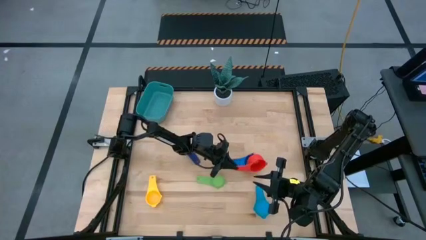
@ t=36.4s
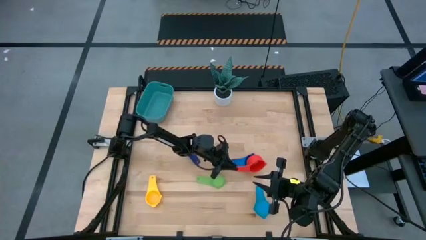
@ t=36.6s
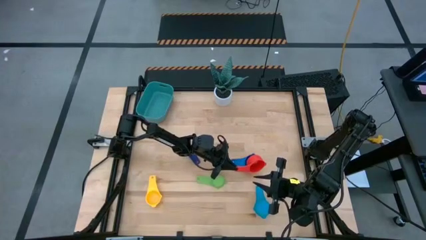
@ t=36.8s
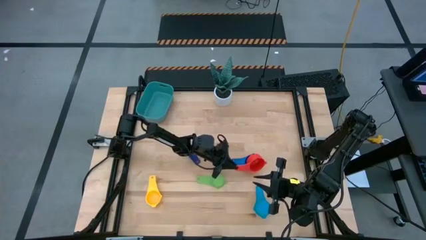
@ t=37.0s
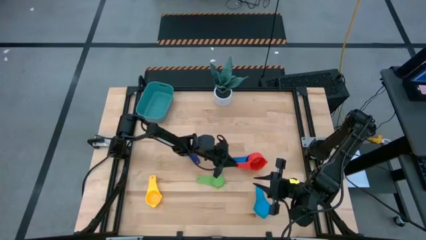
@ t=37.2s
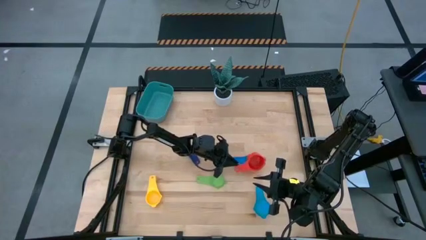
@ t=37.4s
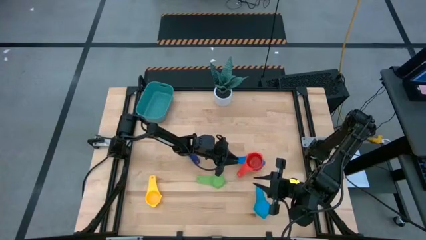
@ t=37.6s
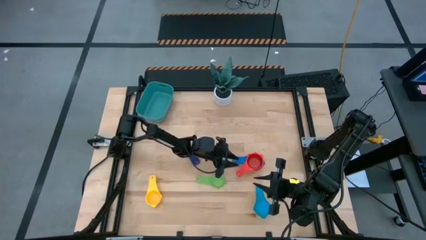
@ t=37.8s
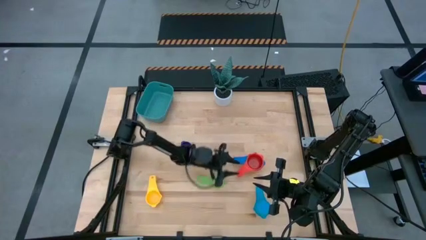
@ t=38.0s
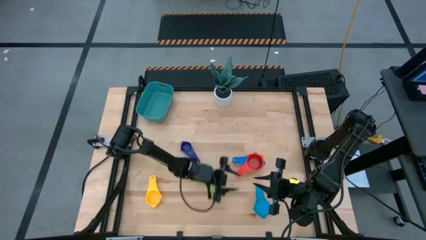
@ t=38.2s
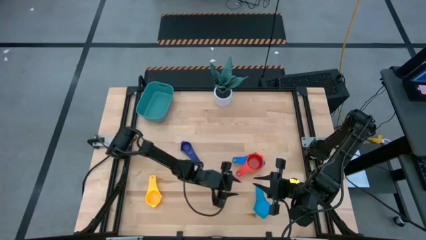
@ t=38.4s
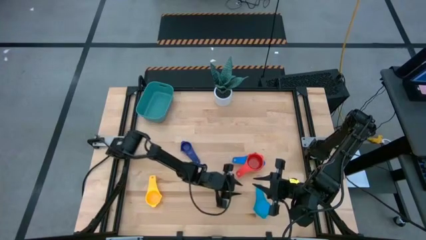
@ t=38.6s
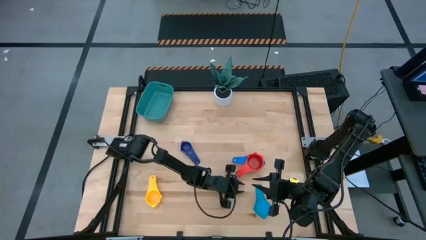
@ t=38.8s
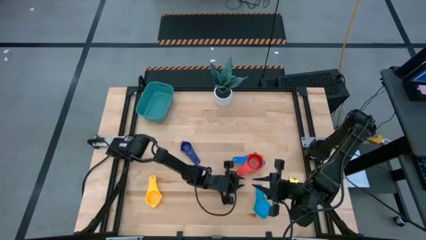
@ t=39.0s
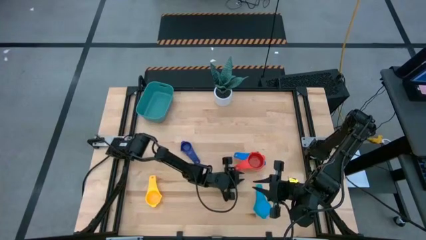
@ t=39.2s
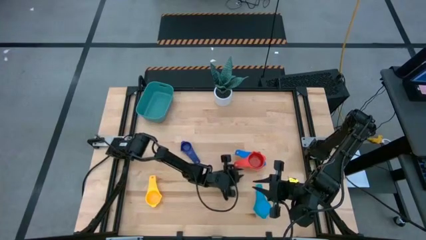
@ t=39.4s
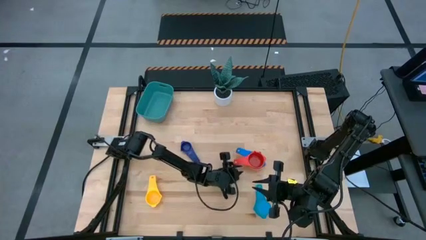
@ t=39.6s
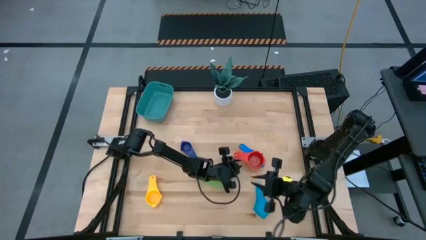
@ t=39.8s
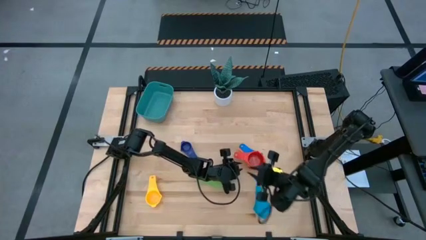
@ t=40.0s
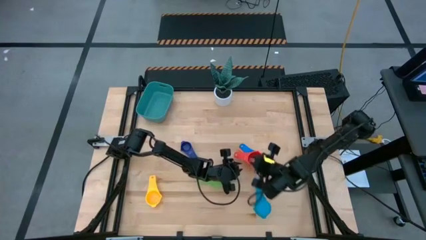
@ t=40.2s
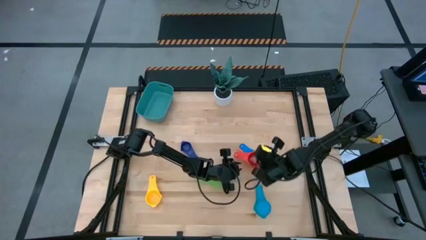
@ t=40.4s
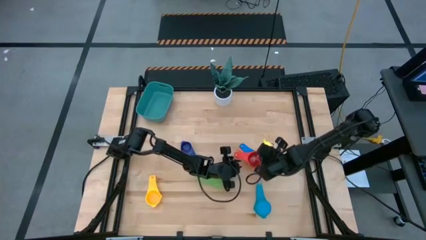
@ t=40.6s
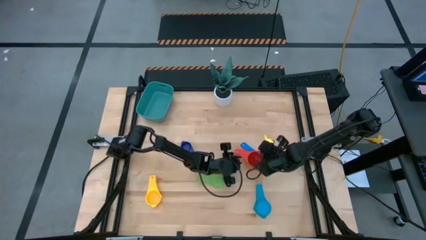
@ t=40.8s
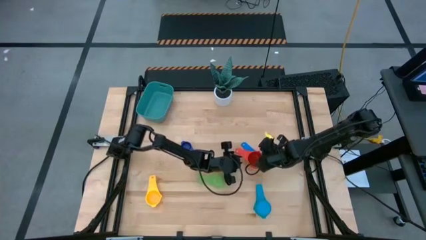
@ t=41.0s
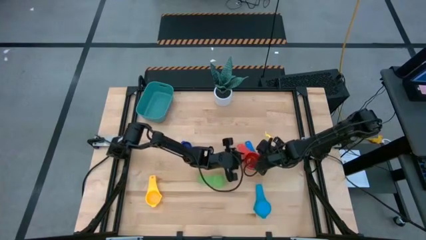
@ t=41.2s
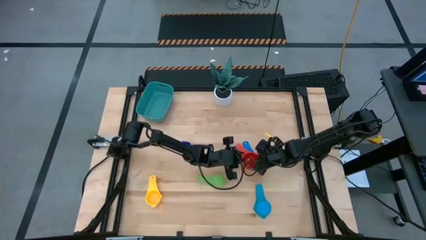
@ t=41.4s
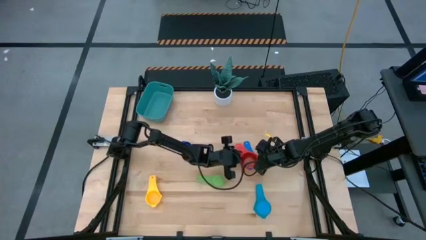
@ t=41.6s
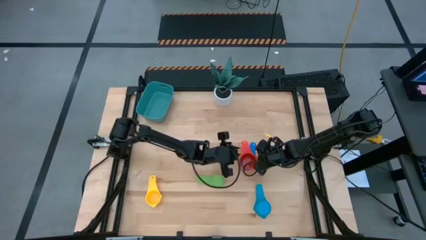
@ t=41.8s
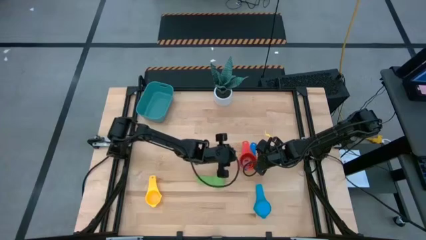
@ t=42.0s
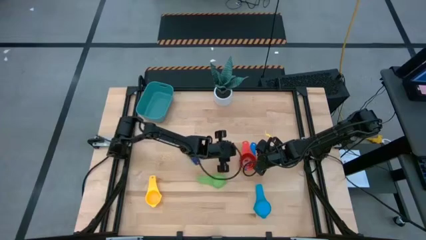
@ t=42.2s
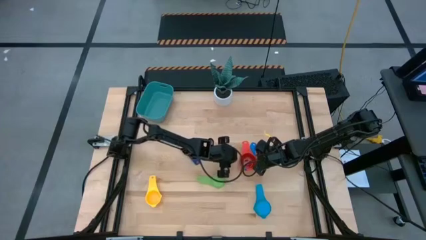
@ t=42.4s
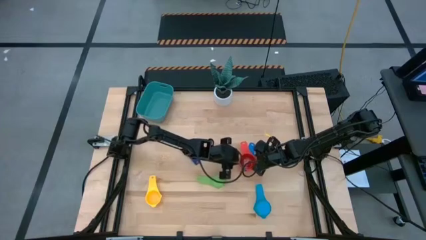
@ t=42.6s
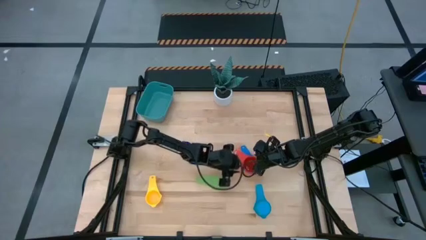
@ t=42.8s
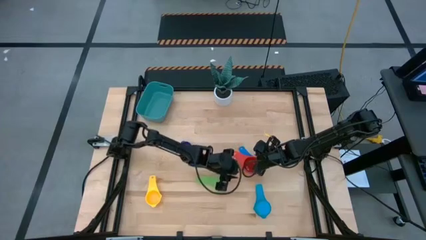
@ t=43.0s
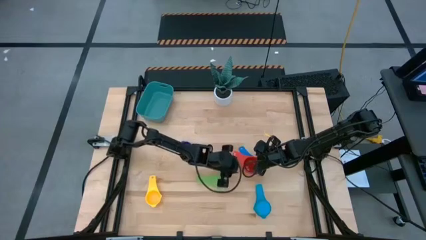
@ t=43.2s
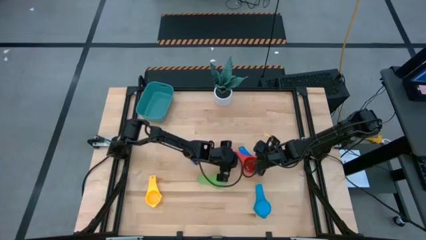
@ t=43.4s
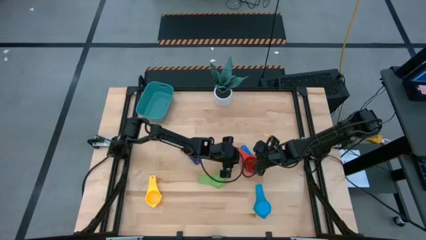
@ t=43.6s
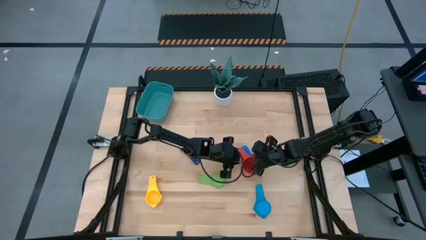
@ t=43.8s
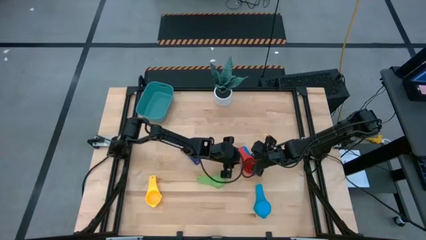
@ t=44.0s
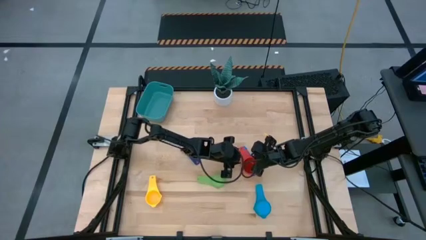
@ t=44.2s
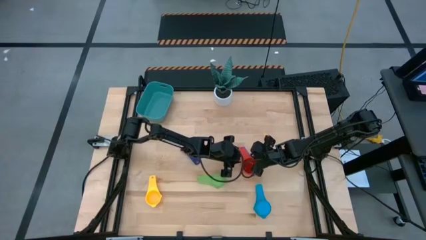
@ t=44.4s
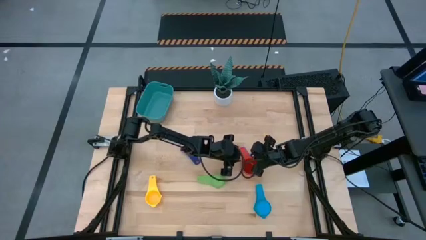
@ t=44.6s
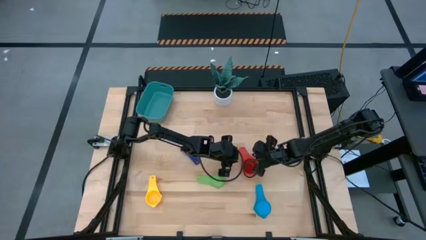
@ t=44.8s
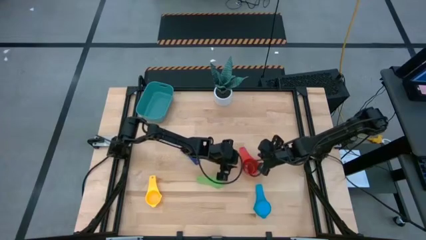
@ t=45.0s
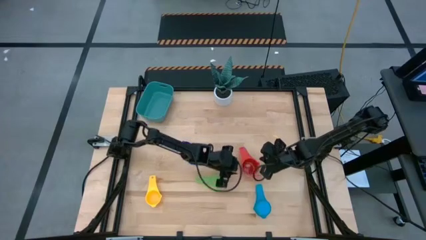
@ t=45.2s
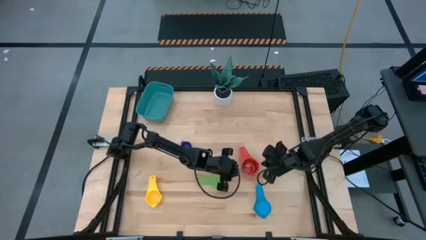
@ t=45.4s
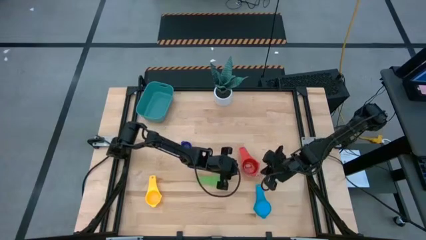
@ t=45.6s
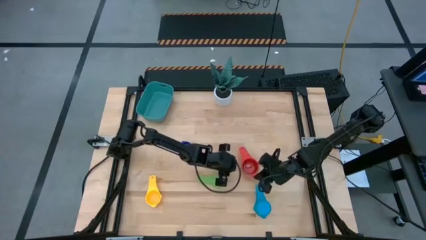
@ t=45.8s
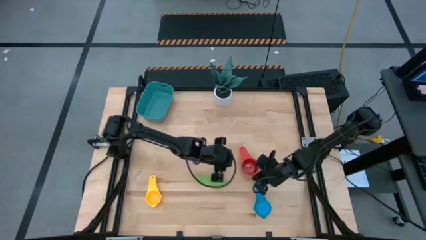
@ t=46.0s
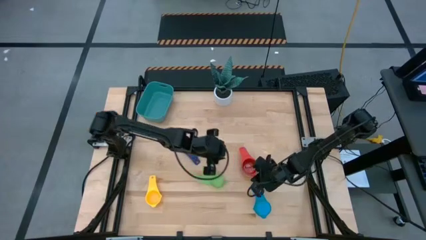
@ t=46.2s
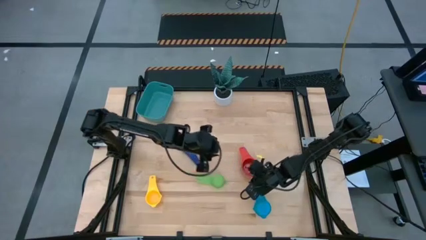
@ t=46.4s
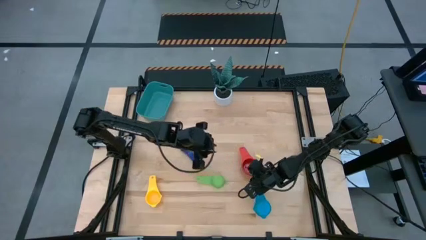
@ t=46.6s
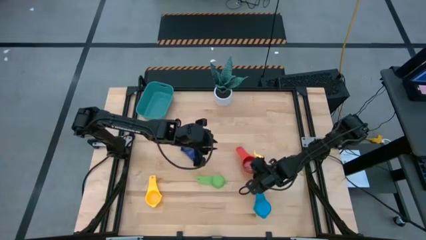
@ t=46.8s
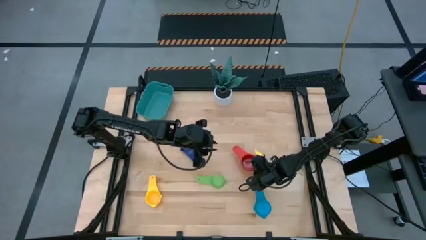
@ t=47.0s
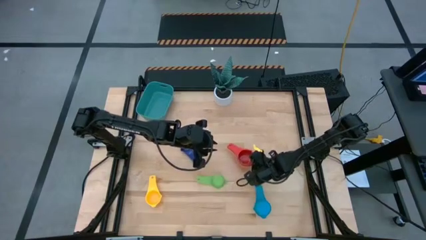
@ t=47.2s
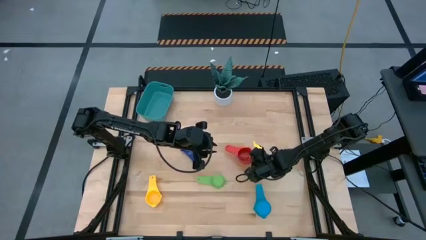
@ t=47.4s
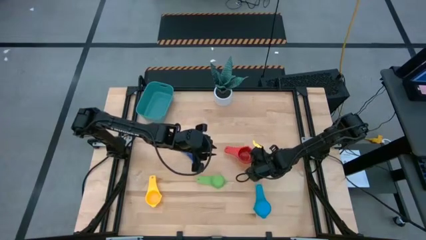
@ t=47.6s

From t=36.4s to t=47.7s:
Task: Nest measuring cups in basket
Stack the red measuring cup on top of the blue measuring cup

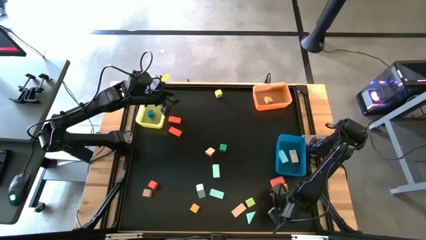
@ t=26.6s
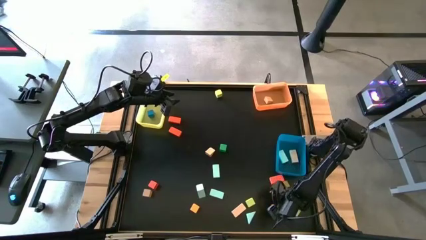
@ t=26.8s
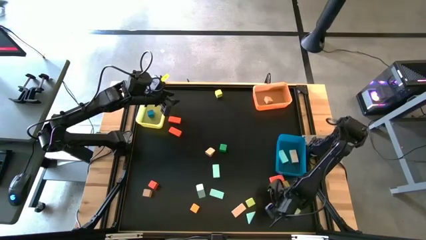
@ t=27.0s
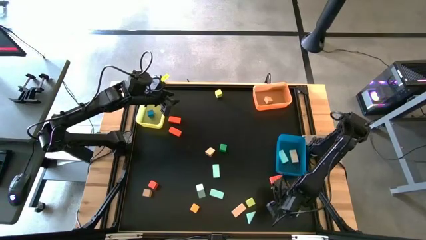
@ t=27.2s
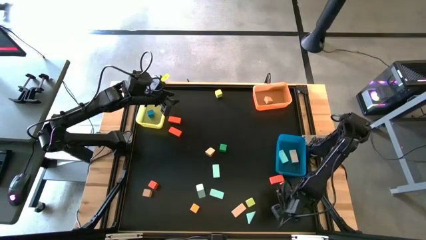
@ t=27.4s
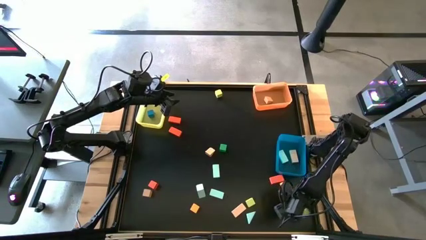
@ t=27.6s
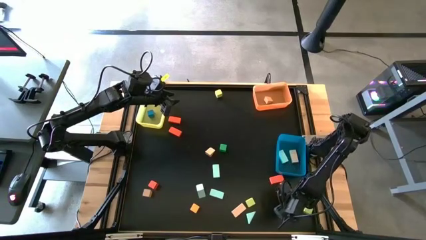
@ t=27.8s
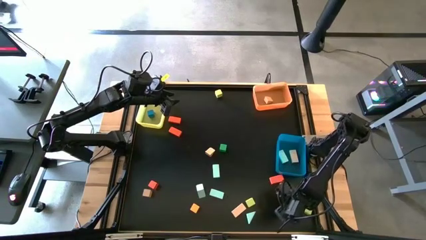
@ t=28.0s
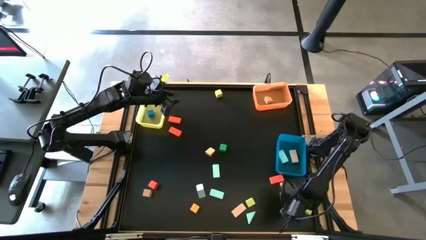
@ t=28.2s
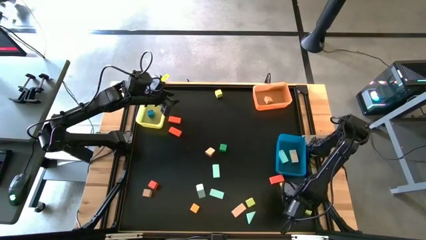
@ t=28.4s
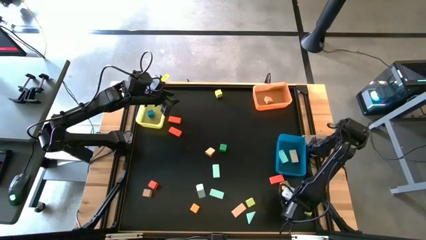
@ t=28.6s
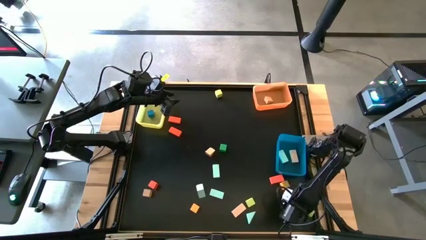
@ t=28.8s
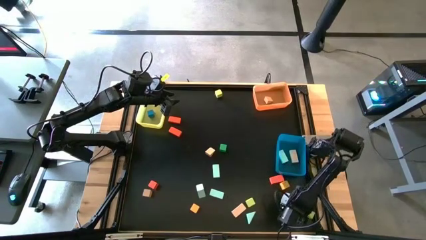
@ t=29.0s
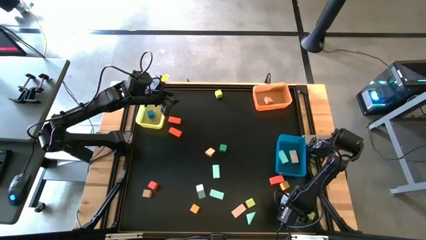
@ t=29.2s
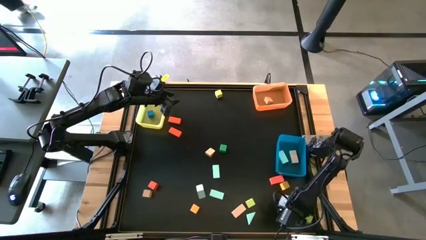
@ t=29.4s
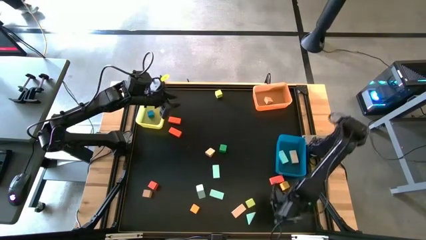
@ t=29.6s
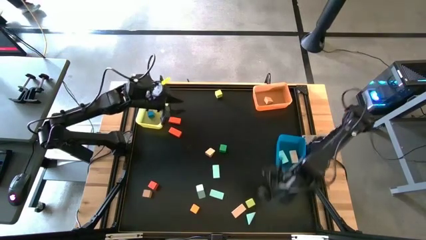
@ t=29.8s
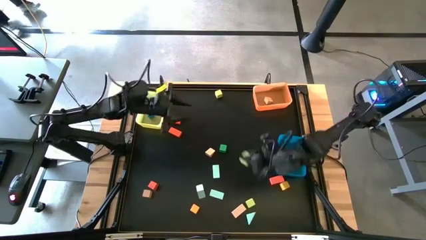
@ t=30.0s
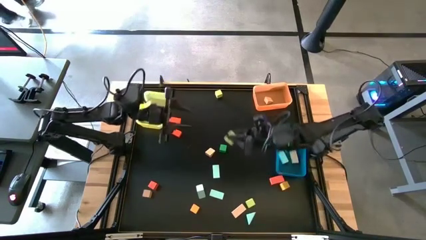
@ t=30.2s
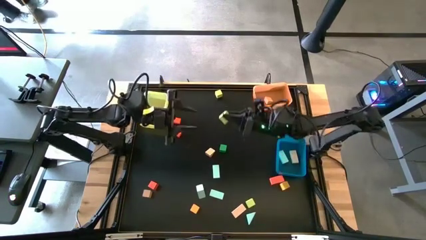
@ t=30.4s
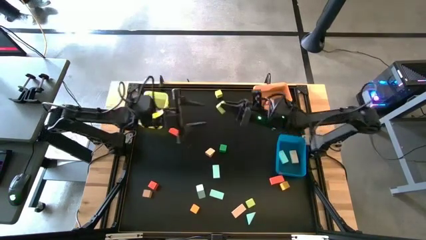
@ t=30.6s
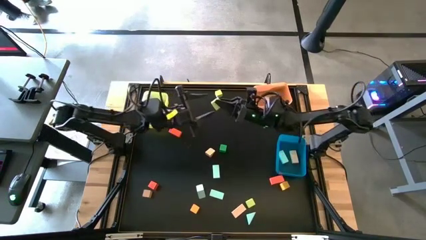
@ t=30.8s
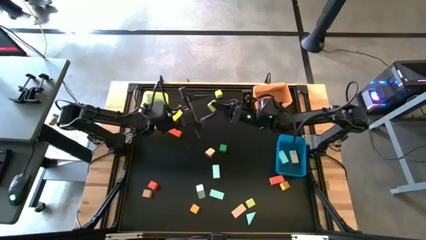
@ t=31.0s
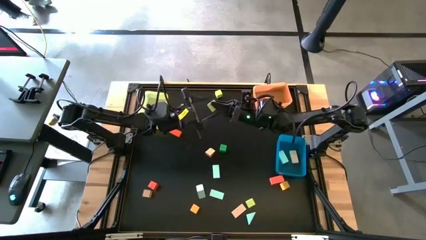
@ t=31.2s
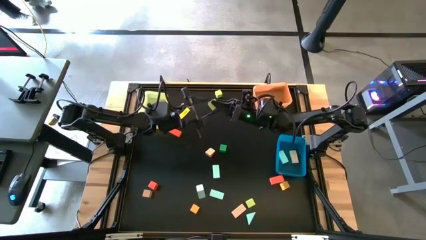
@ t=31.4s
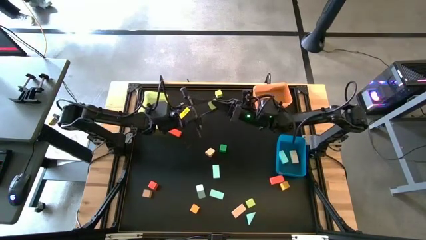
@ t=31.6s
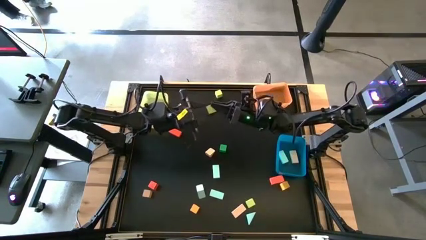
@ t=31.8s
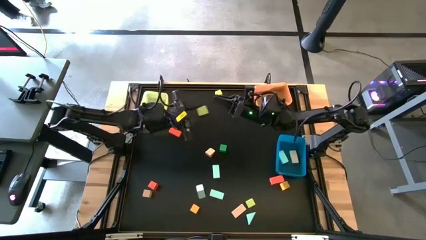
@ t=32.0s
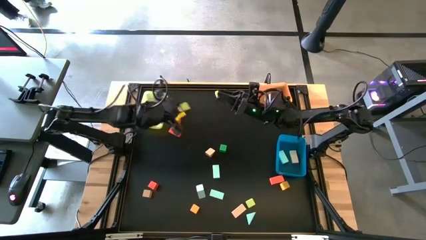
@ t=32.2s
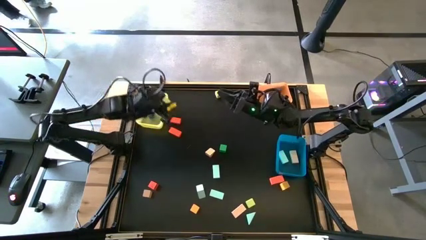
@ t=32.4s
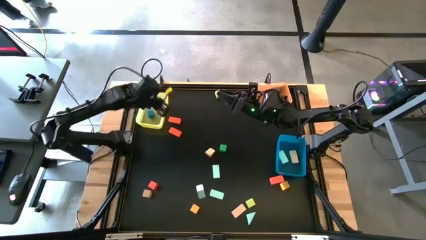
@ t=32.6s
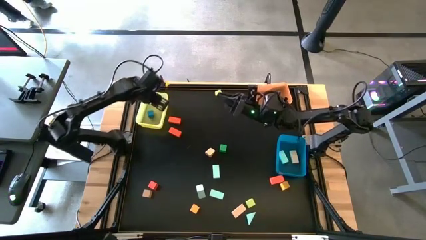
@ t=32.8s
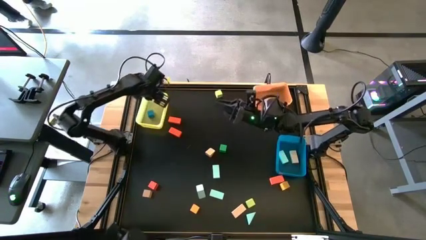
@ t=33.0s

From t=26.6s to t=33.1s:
Task: Sort blocks by size
Put the yellow square block into the yellow bin
